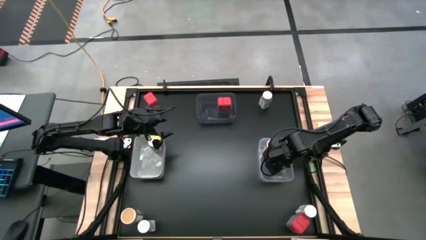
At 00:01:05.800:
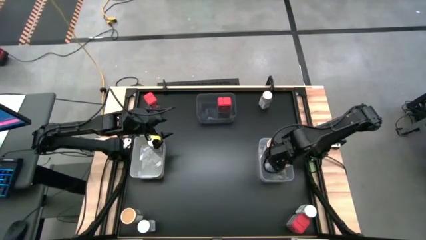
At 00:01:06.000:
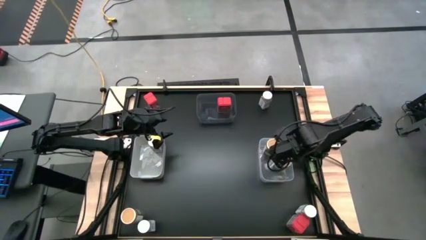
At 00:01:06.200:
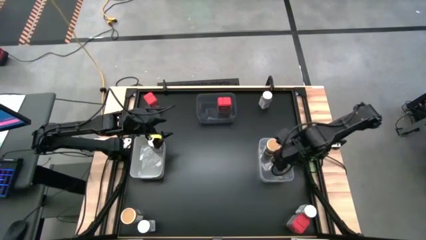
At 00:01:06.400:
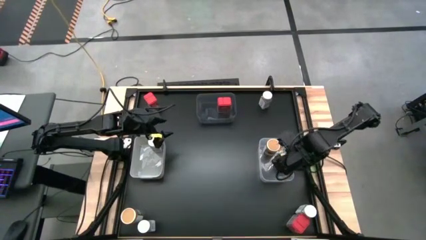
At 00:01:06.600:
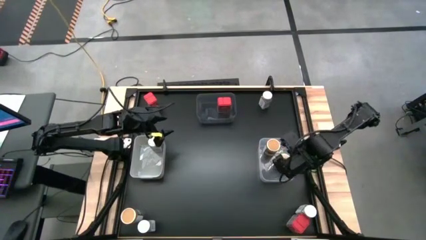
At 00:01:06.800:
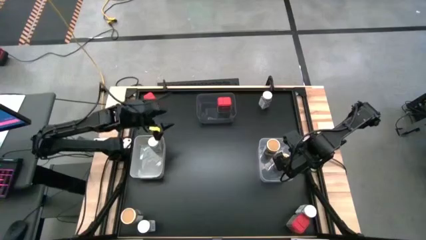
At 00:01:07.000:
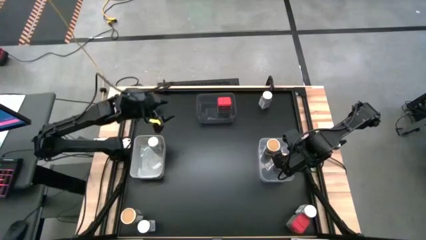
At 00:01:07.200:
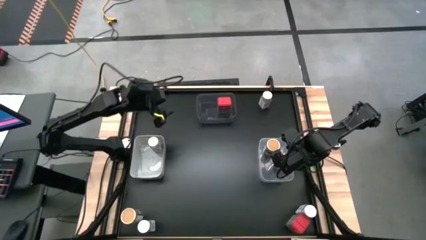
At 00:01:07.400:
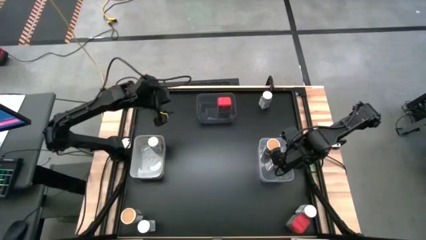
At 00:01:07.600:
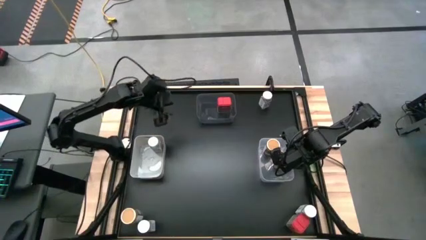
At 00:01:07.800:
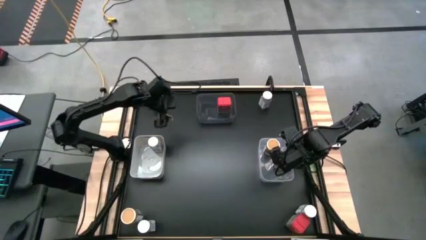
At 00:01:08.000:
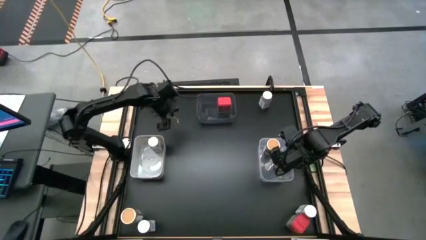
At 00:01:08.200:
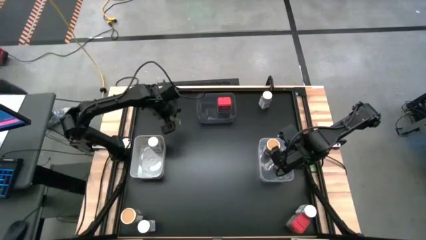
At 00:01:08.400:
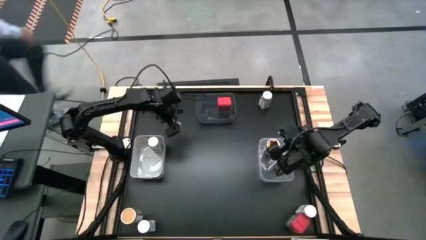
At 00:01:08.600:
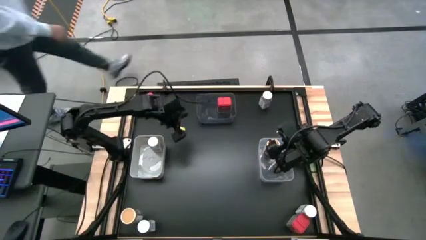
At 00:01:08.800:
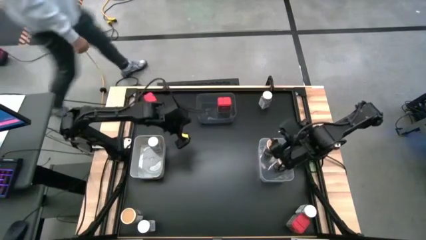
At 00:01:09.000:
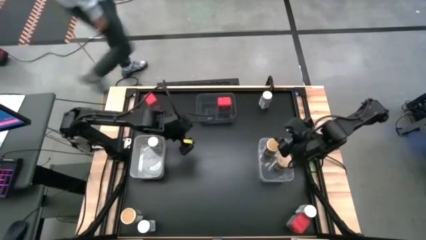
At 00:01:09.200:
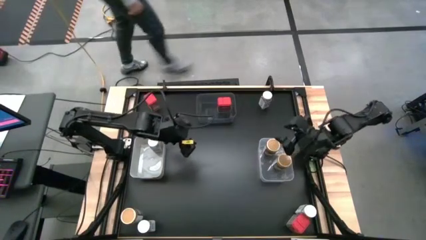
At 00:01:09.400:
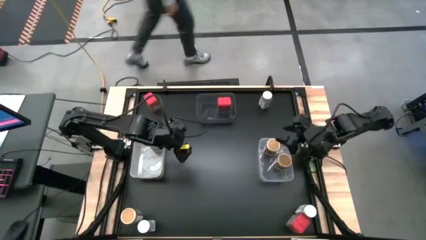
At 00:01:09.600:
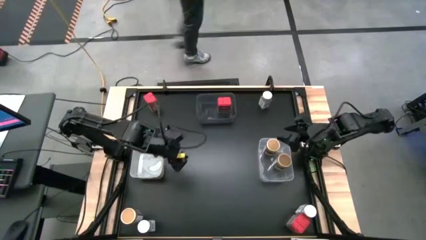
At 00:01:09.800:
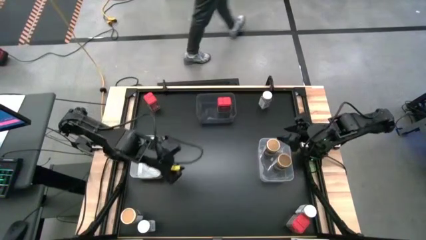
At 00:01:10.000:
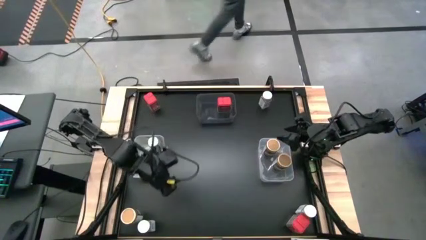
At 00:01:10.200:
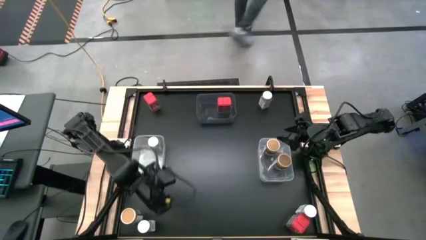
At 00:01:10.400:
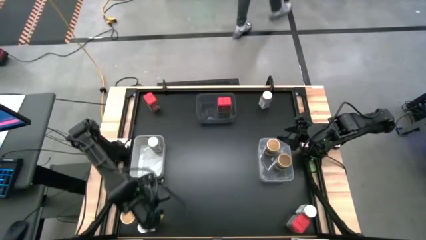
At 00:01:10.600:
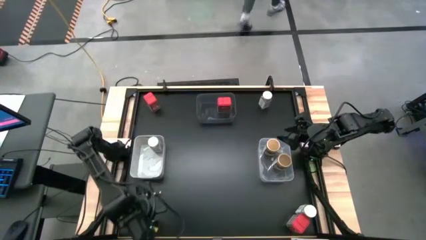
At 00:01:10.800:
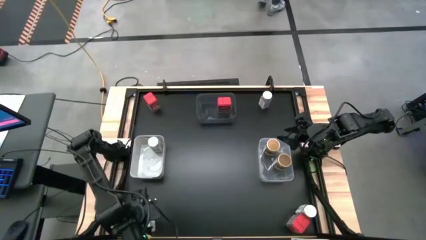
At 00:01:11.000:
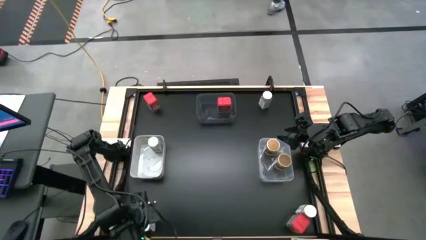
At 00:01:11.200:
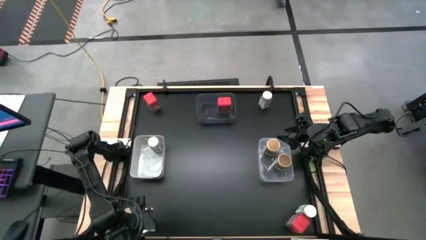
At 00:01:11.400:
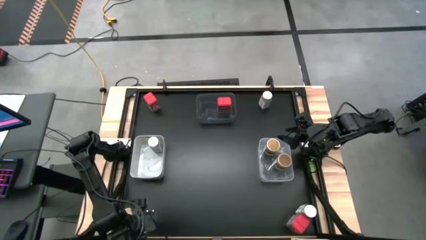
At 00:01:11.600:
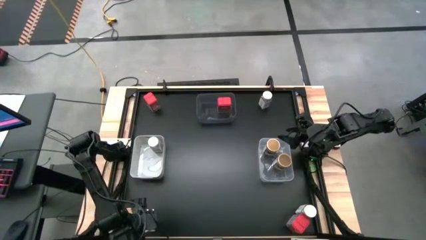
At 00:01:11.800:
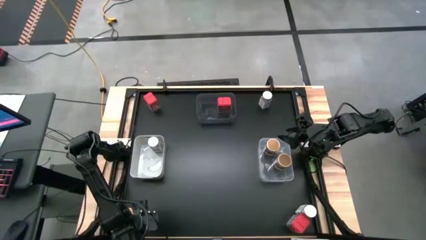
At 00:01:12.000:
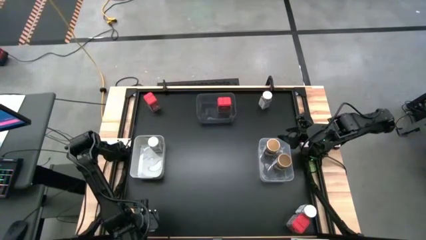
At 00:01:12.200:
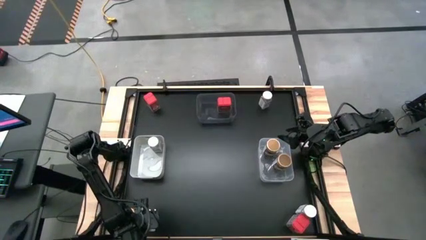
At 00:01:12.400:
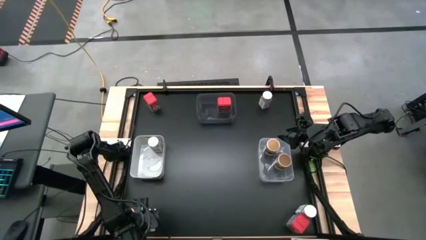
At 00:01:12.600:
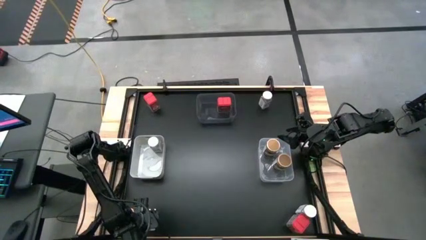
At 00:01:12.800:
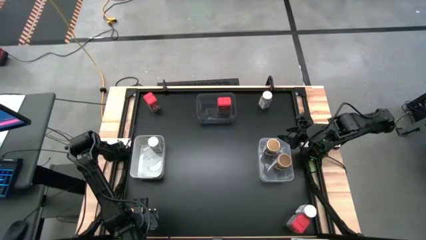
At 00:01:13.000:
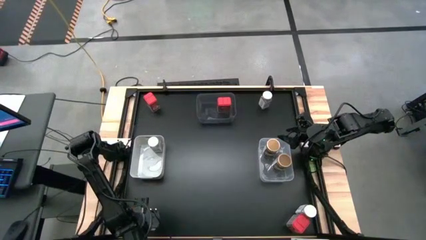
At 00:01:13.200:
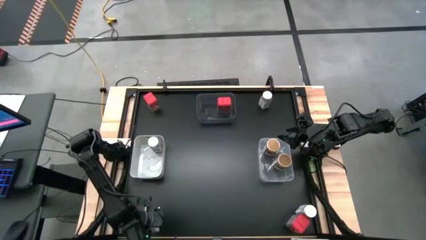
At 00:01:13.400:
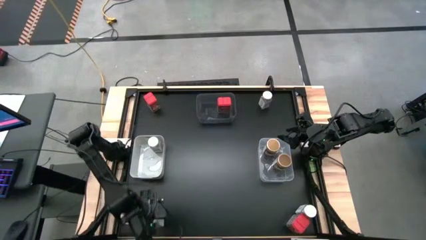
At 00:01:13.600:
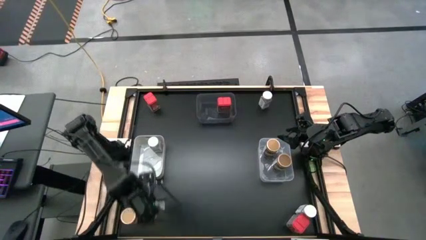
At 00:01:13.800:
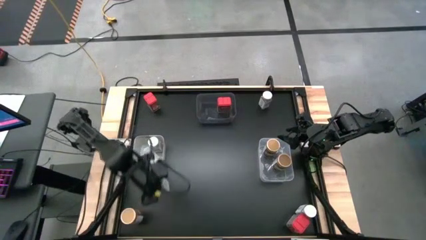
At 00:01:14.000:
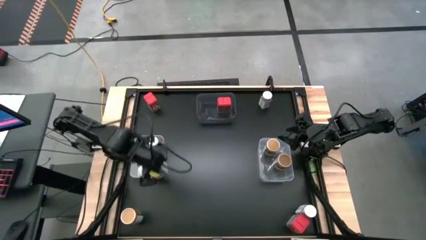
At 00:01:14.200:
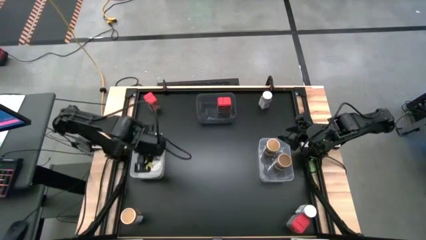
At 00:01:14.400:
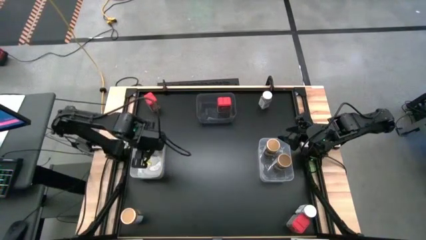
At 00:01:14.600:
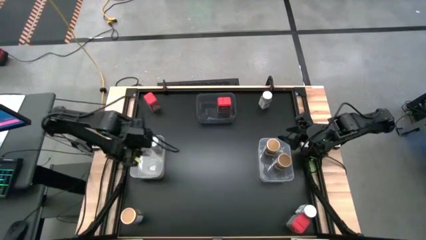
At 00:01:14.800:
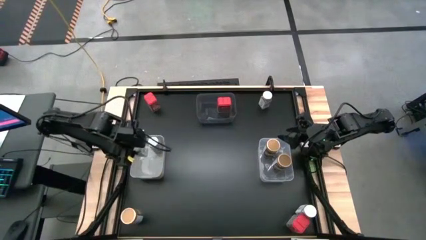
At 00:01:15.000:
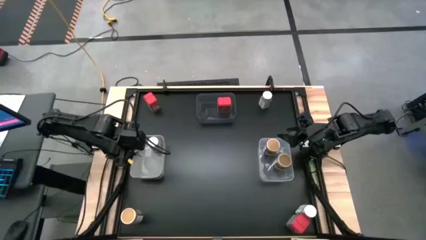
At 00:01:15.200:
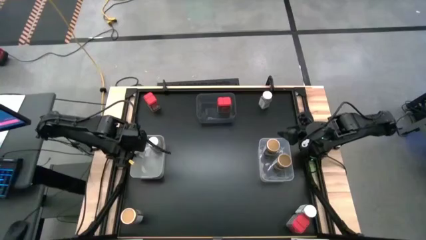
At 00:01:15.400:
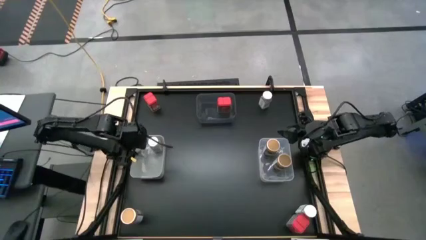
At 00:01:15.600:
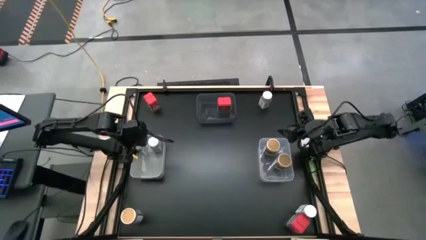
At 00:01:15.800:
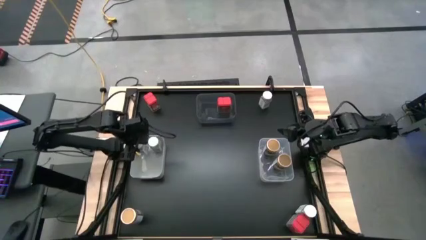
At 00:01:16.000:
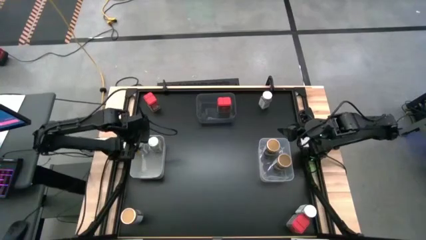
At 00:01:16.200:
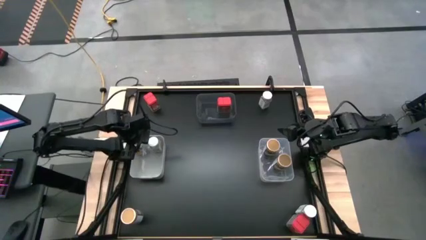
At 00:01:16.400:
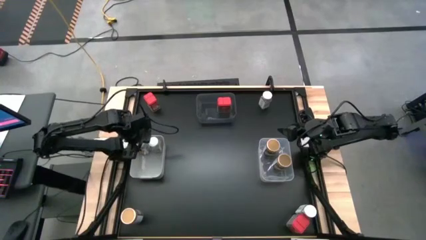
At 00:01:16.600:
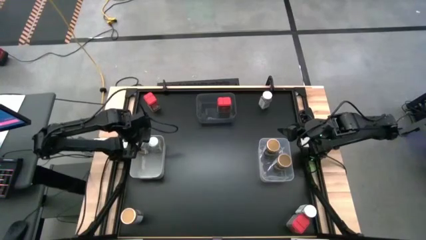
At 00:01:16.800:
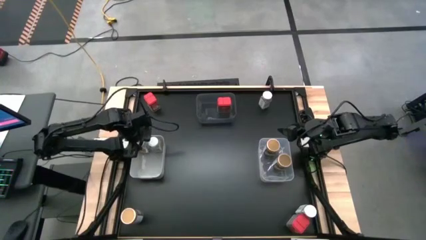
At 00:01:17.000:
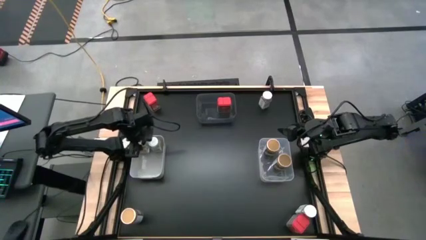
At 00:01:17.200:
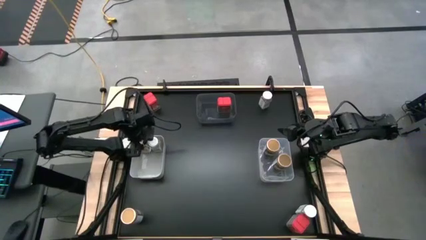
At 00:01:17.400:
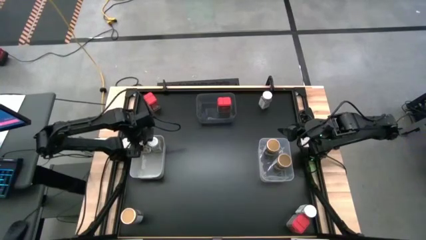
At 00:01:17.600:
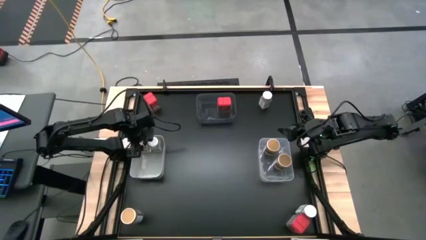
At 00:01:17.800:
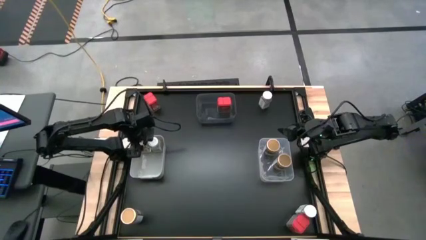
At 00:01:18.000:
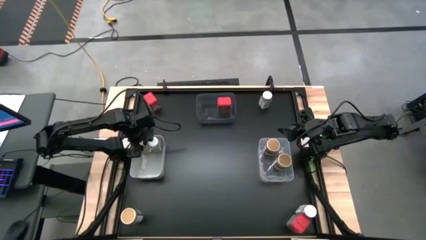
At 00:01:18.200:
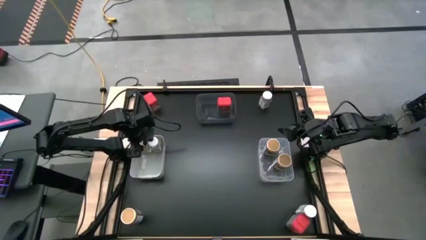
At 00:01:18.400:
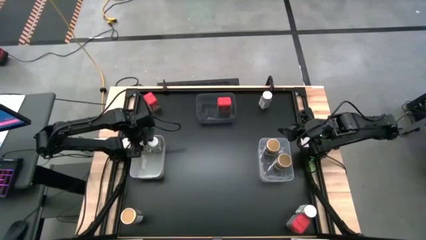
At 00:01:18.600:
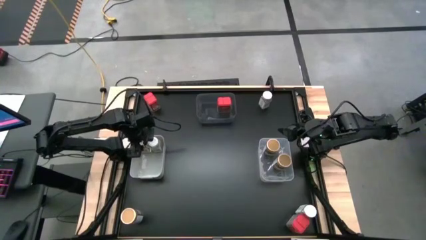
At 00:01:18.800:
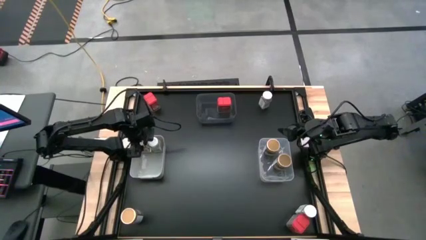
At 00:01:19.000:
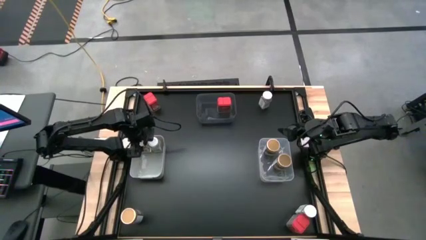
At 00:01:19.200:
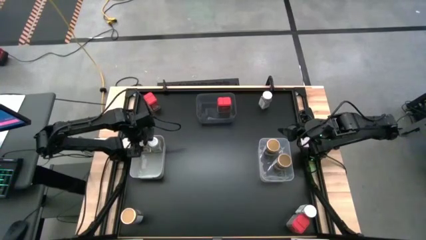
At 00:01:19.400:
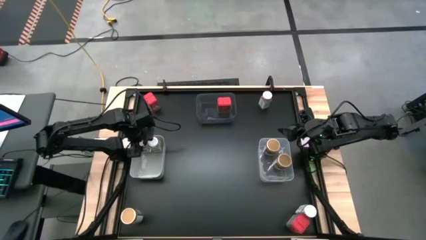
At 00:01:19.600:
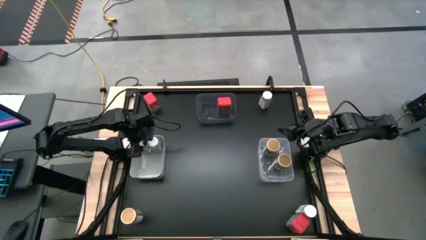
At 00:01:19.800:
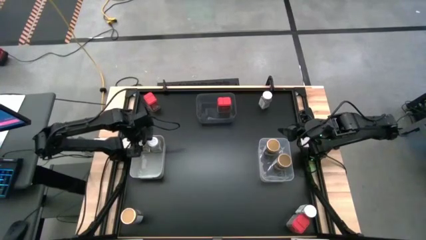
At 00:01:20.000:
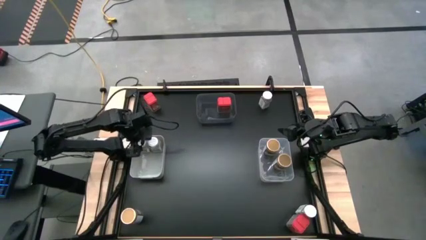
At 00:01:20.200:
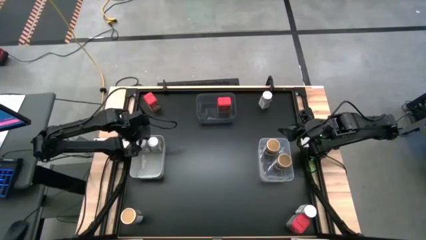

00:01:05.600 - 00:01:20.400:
Task: Sort spices by type
Put the bottom white seasoning bottle into the white bin
